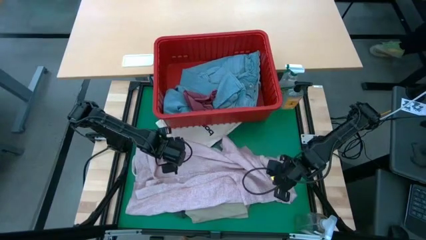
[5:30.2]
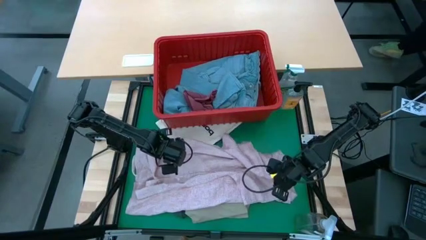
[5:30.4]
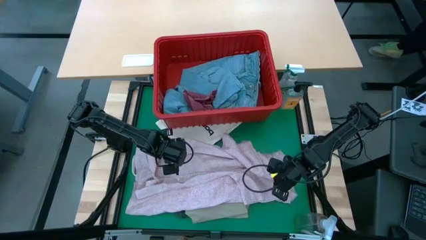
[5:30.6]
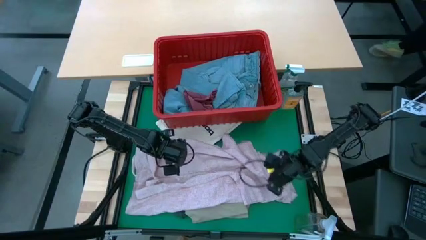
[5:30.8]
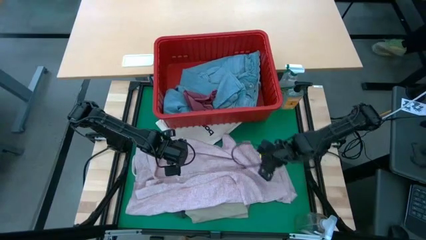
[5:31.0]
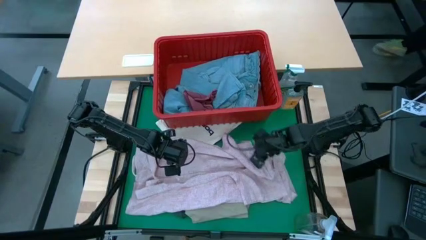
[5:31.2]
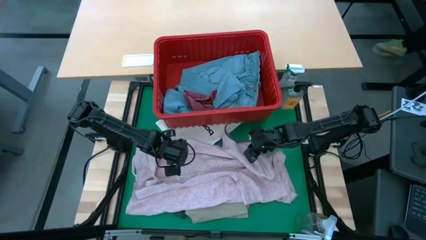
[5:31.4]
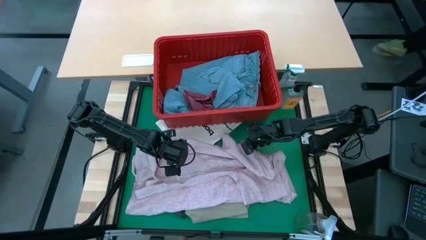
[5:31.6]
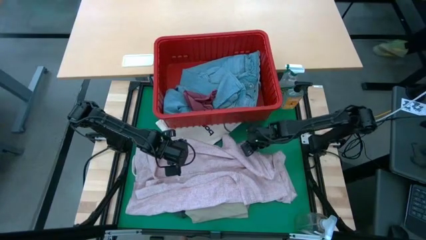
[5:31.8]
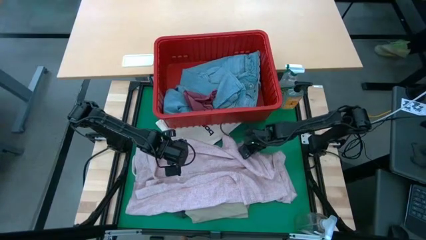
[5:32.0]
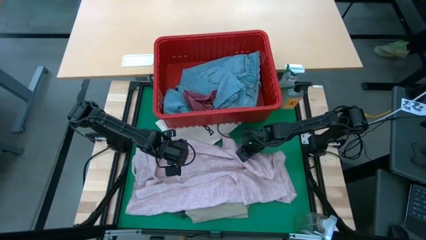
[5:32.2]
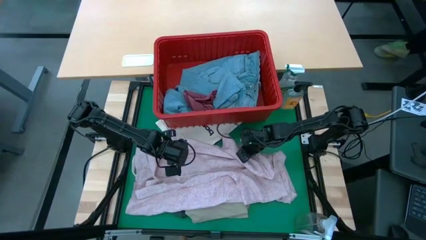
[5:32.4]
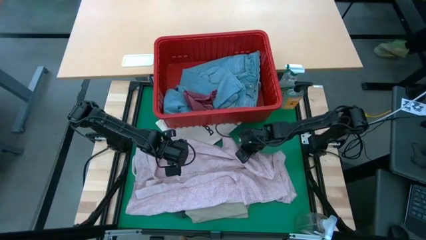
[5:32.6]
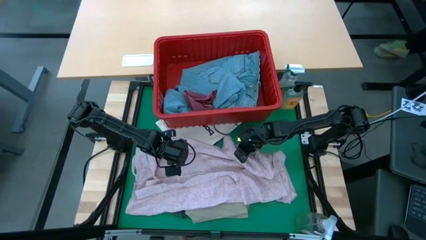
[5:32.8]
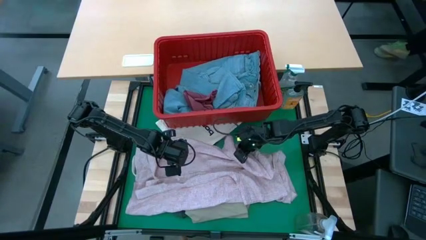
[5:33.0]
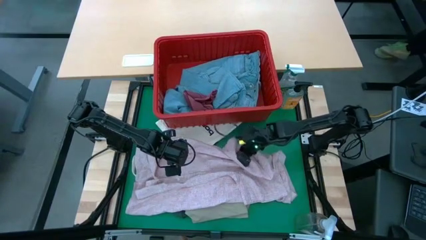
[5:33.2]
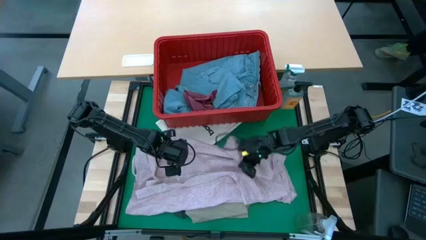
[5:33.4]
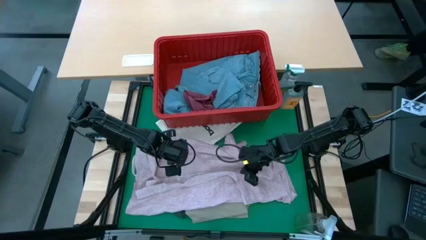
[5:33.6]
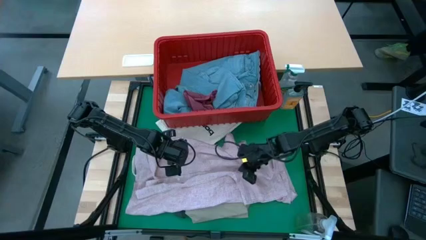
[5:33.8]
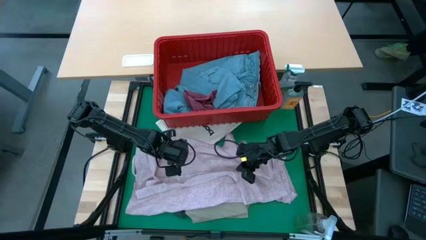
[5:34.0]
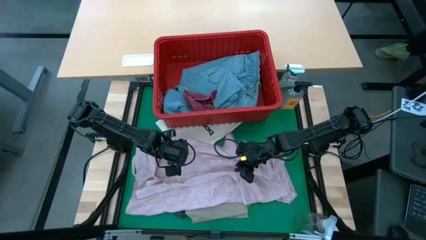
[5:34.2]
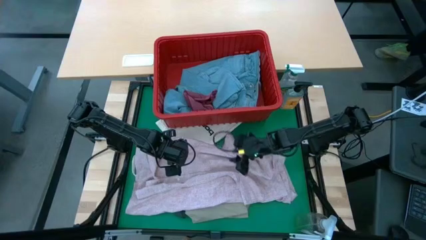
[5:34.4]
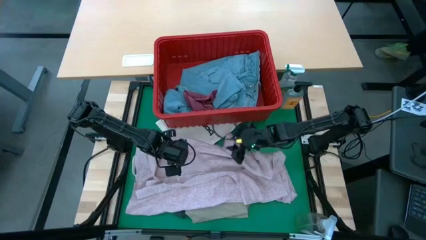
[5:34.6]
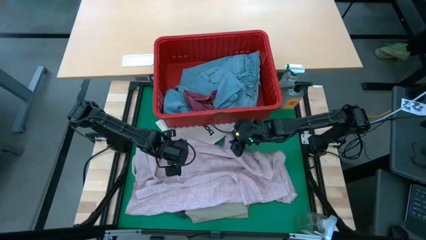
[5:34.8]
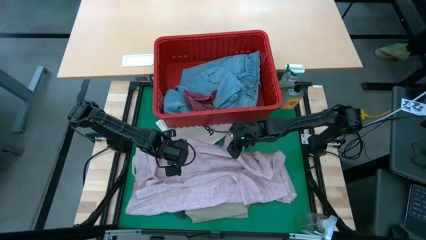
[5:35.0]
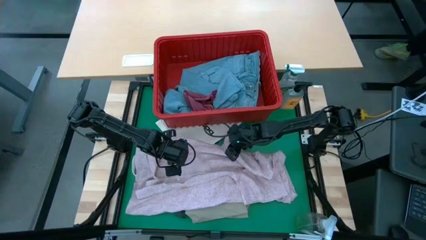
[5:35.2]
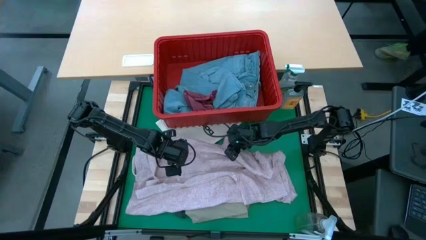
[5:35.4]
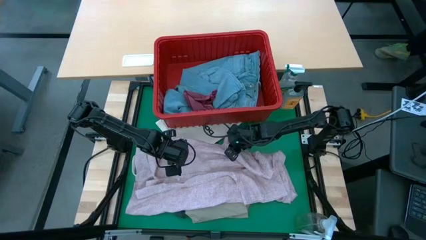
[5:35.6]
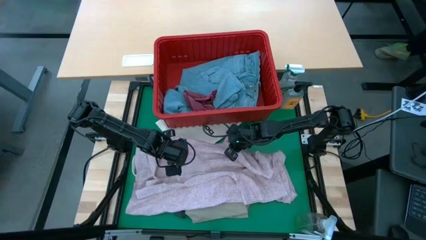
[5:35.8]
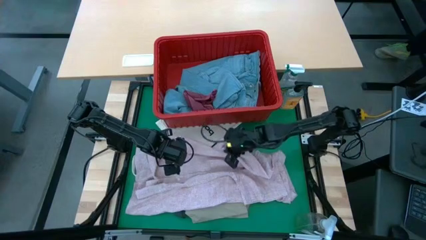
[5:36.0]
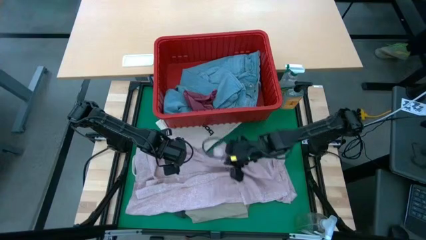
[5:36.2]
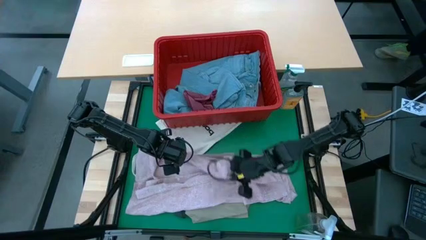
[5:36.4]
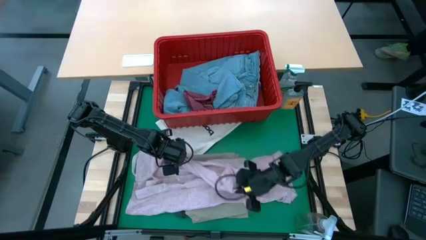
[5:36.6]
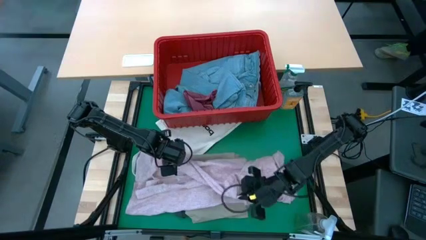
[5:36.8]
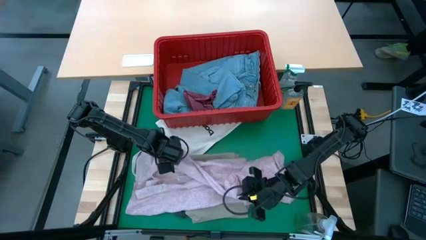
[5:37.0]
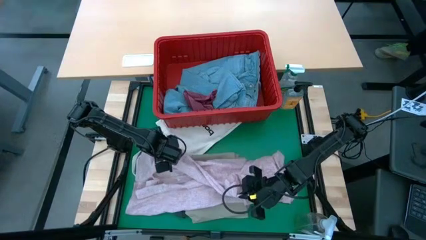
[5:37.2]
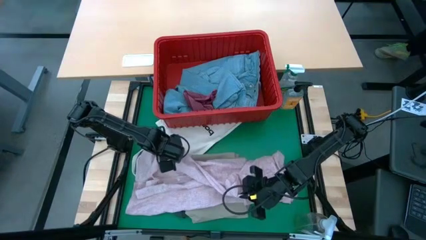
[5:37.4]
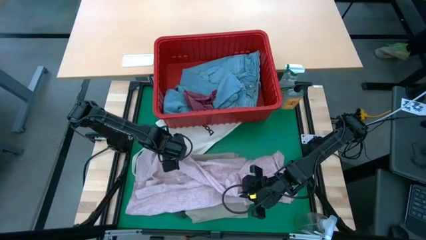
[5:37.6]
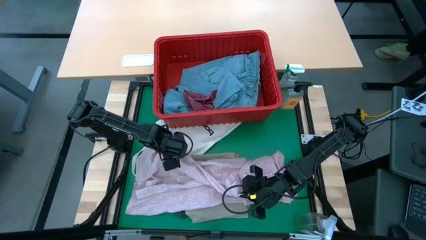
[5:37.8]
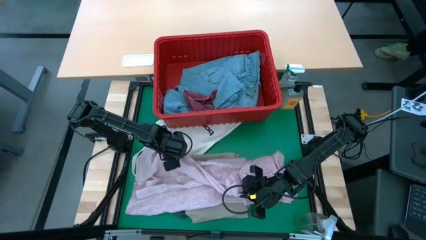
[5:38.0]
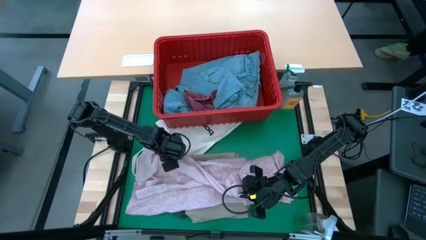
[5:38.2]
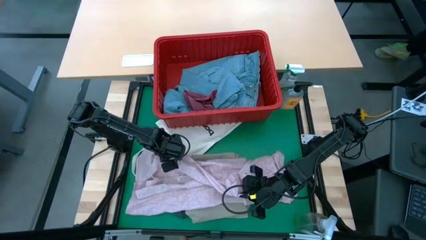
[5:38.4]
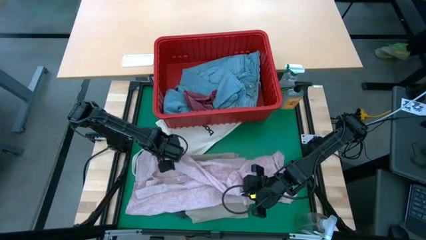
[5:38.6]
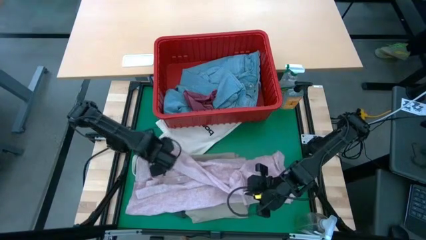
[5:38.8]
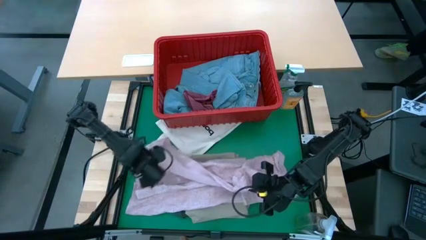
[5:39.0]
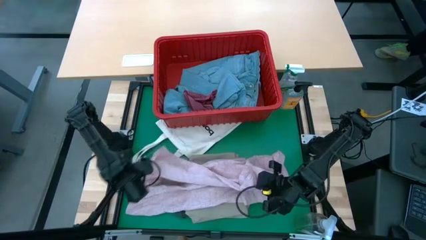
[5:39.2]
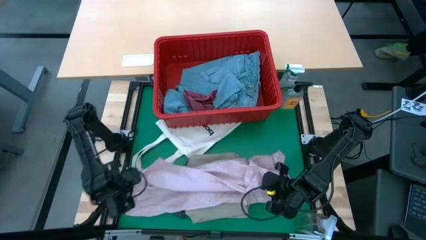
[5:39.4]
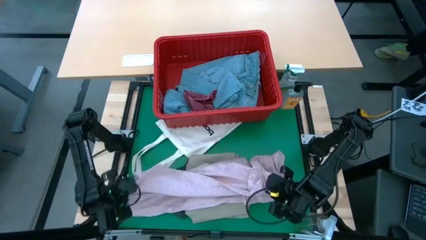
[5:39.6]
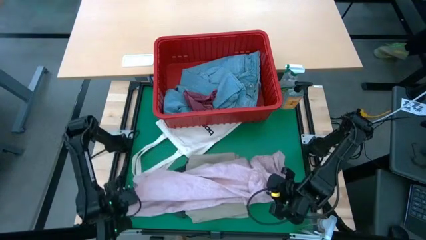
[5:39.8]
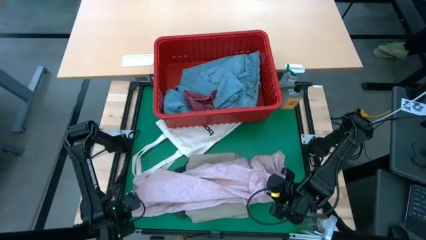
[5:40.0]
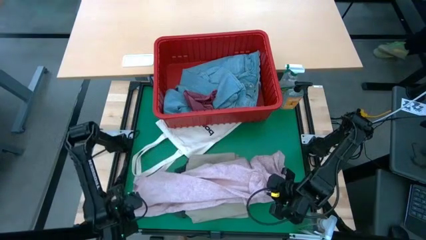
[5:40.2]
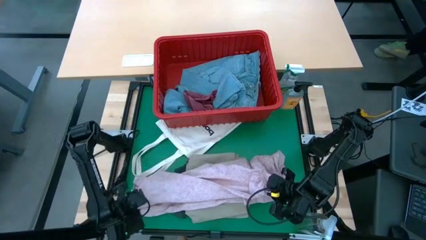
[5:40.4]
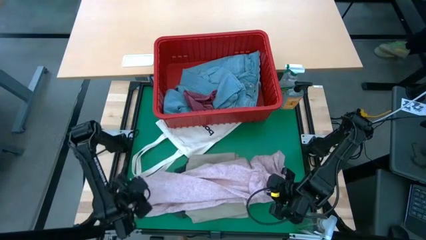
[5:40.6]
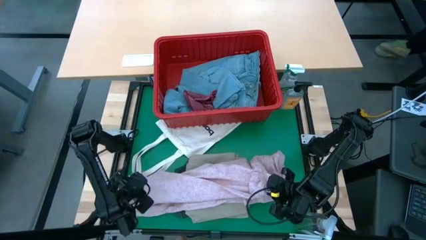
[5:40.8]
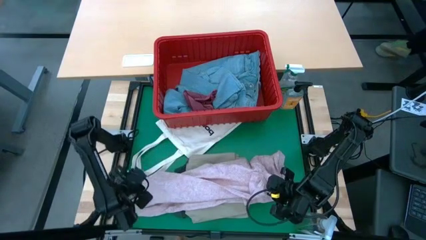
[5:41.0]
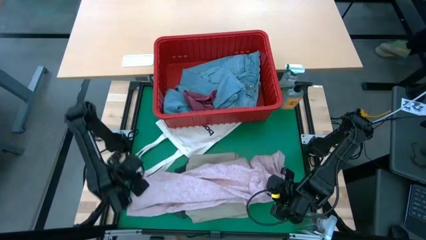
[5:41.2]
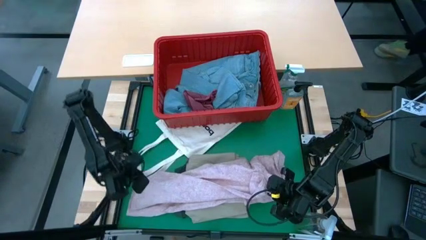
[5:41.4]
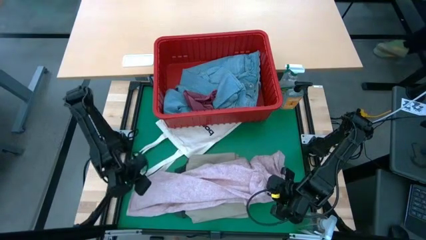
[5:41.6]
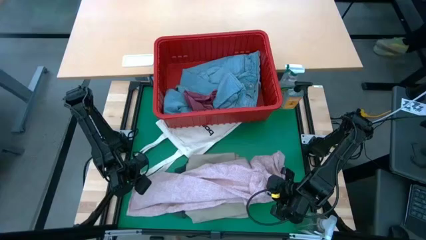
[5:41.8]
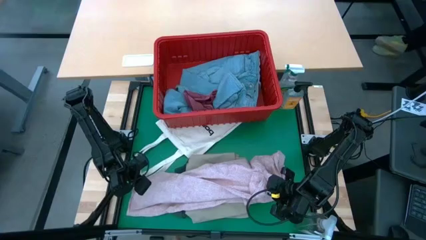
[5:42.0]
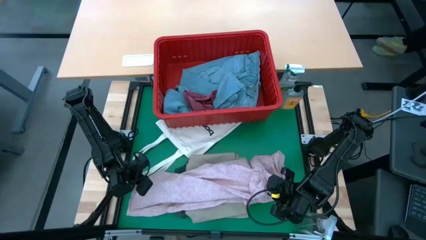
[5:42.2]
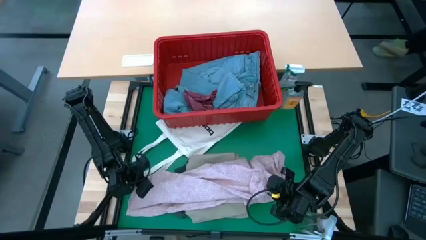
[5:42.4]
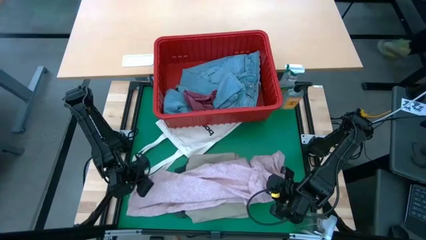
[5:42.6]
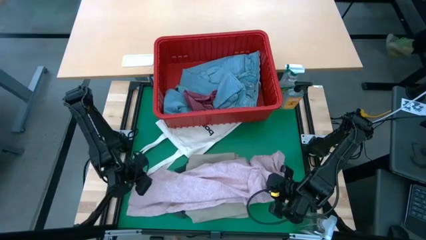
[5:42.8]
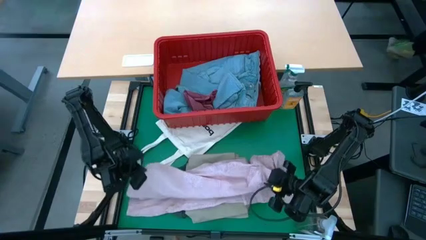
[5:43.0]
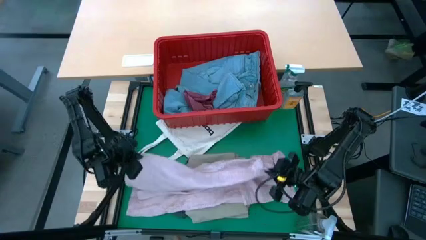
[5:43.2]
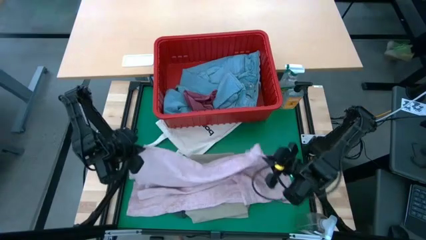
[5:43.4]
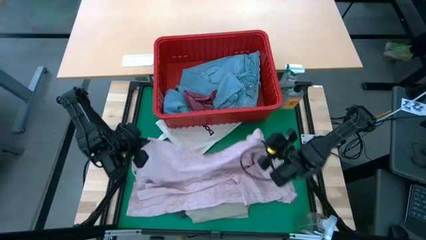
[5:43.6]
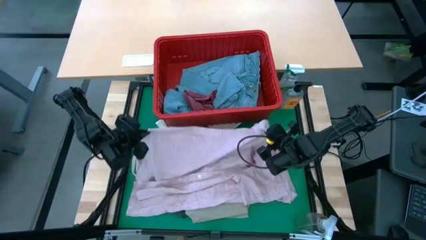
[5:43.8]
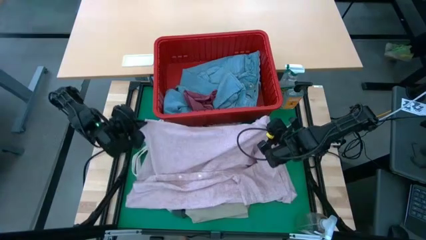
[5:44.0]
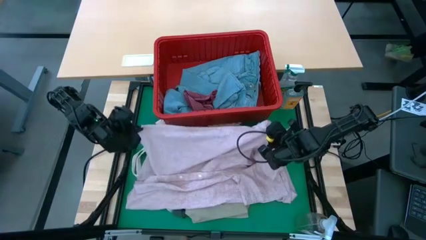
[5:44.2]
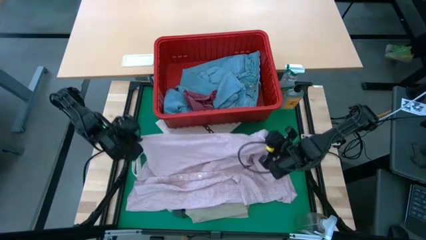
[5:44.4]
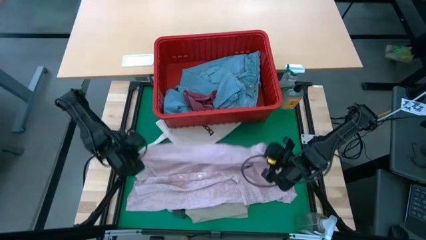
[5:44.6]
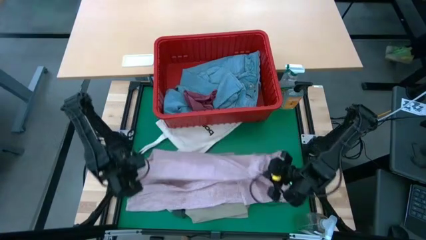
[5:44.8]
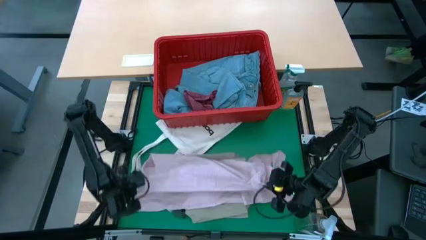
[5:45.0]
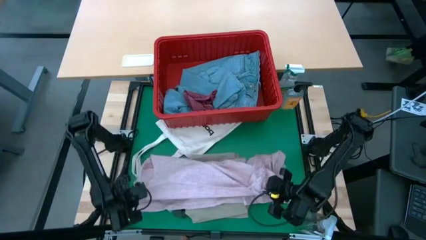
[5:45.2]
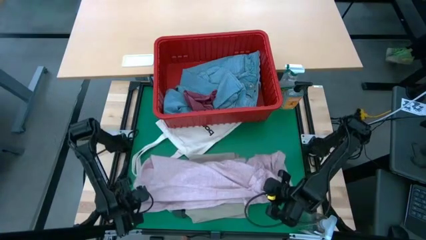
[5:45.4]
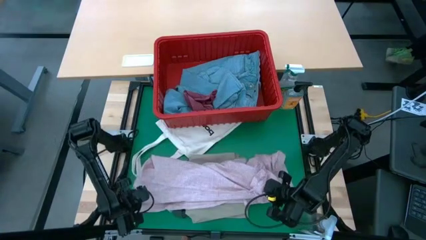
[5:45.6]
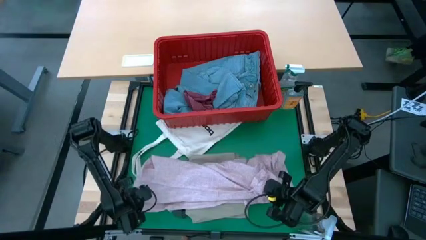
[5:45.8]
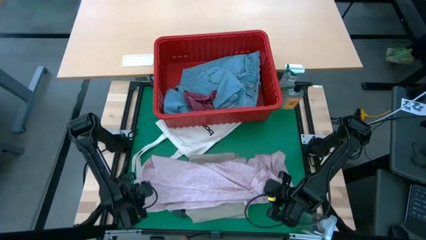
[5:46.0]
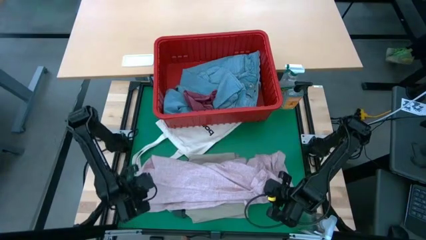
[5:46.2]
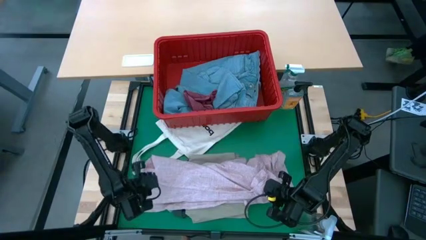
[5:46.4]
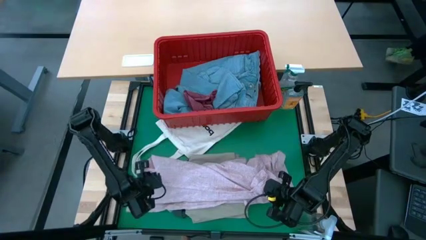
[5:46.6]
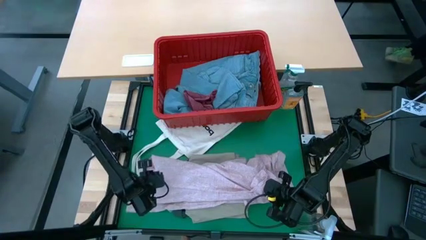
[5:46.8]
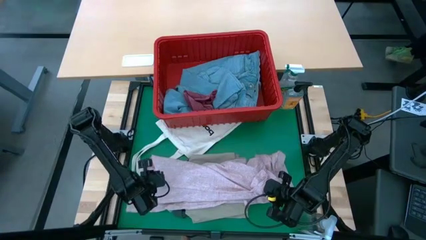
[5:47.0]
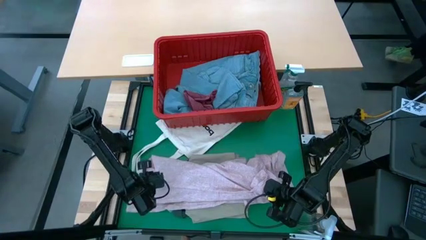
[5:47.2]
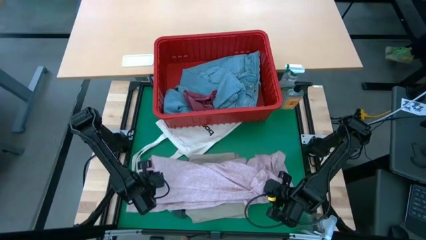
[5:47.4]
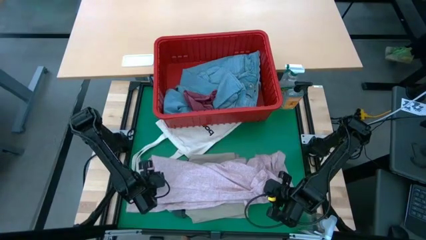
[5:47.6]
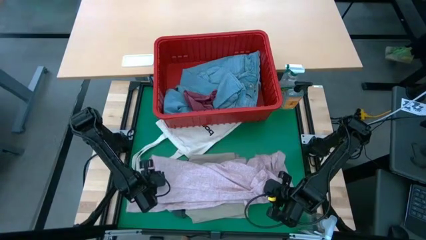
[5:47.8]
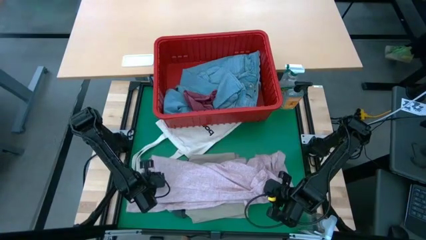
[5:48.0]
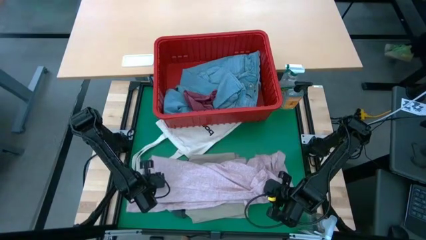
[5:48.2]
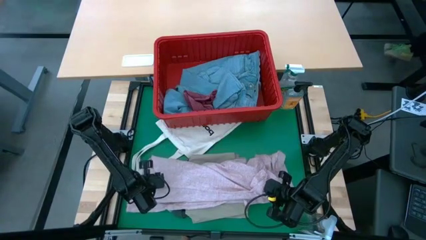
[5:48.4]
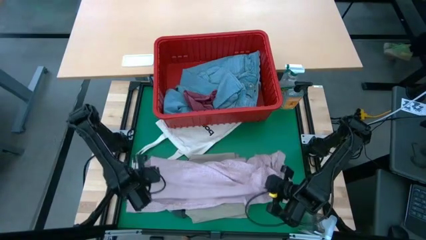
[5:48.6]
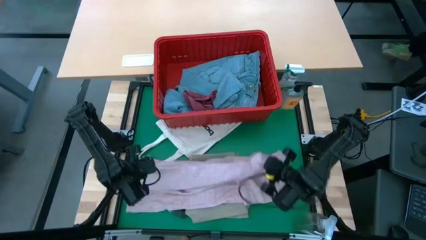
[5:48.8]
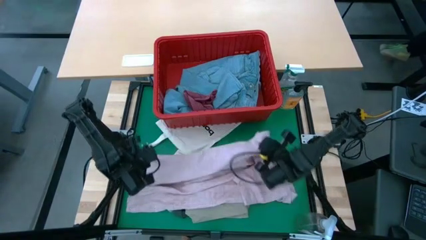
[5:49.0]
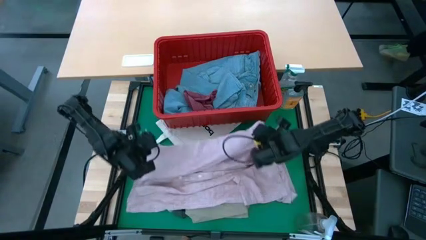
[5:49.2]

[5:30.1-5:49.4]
Task: Fold laundry
Fold the pink shirt
